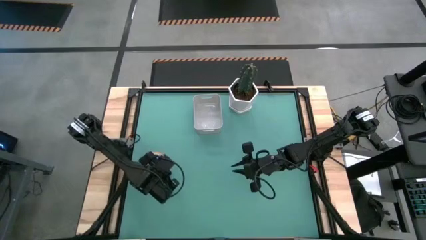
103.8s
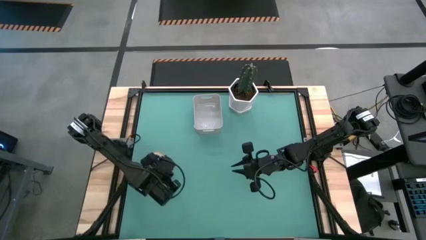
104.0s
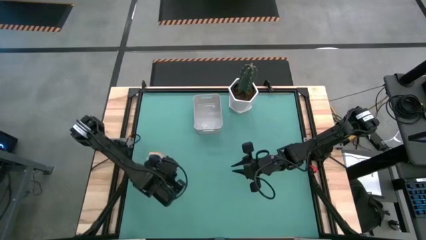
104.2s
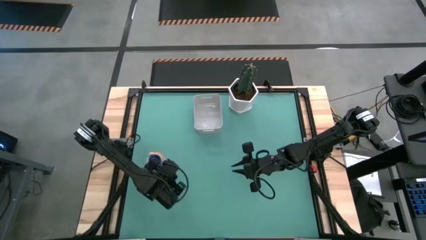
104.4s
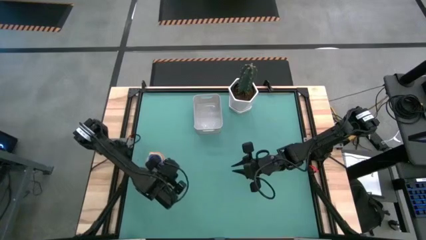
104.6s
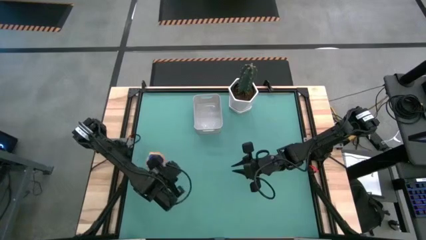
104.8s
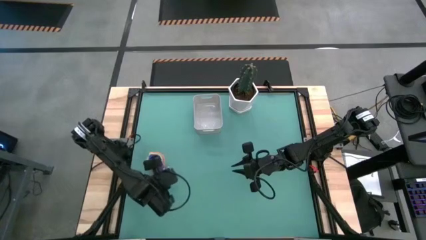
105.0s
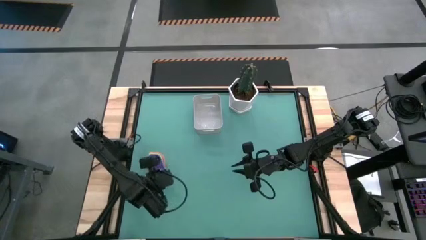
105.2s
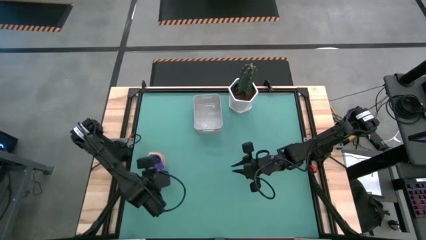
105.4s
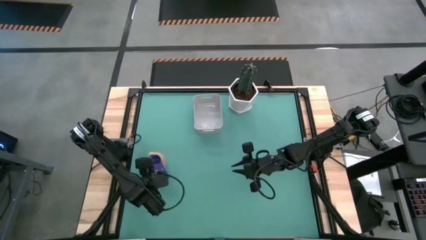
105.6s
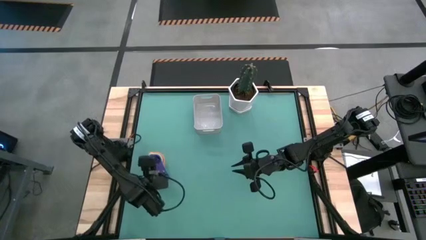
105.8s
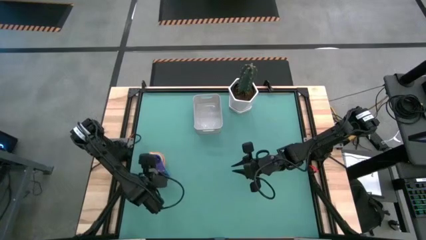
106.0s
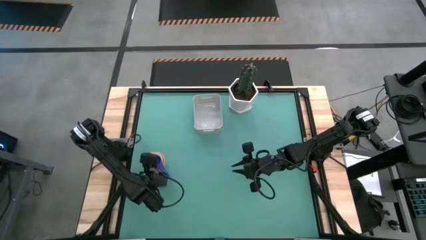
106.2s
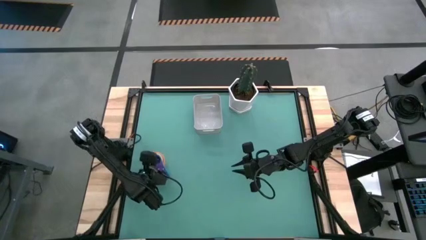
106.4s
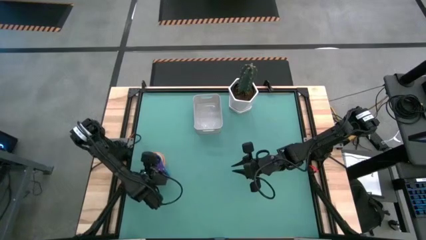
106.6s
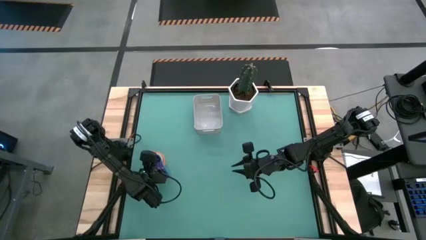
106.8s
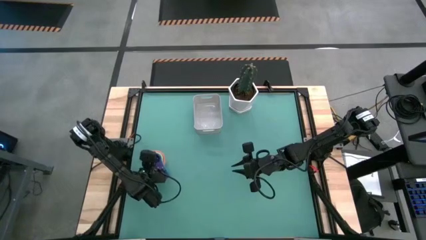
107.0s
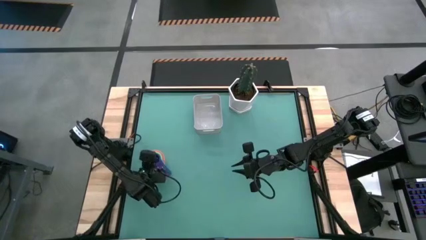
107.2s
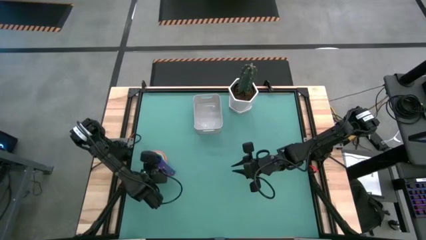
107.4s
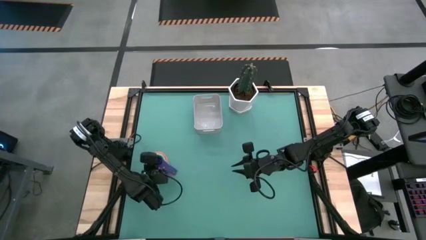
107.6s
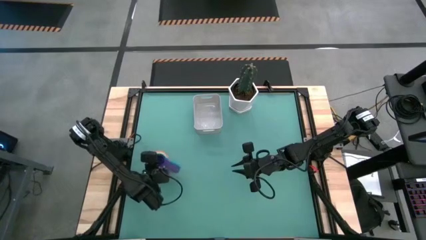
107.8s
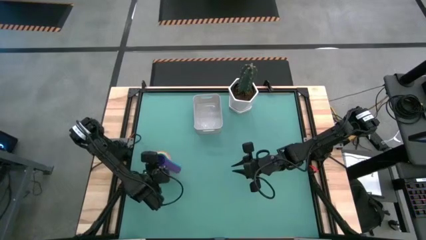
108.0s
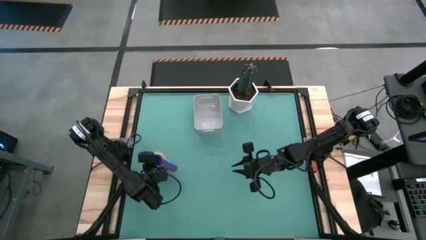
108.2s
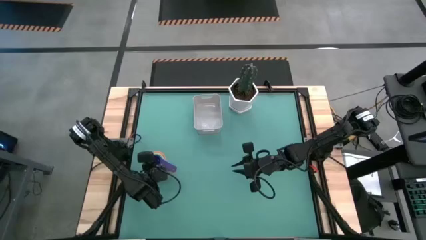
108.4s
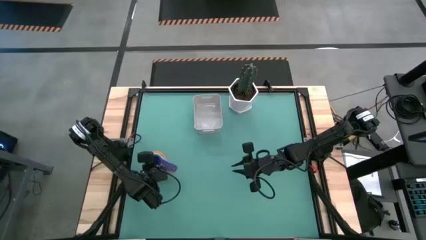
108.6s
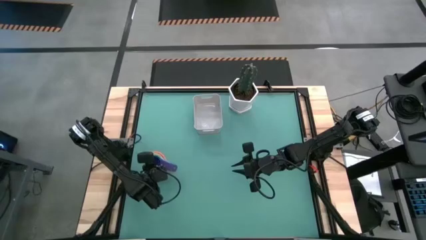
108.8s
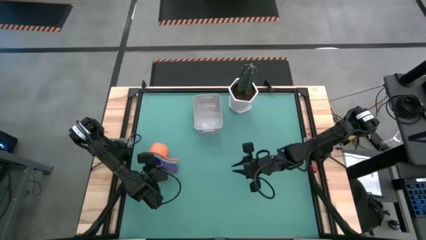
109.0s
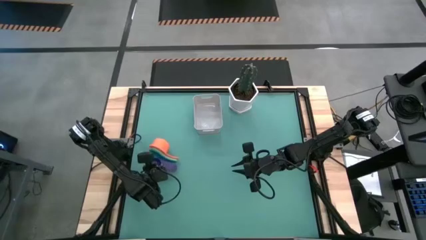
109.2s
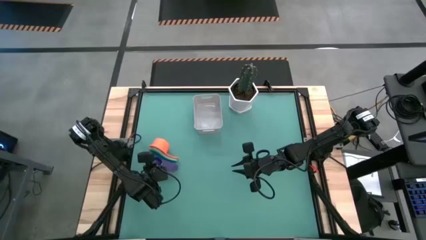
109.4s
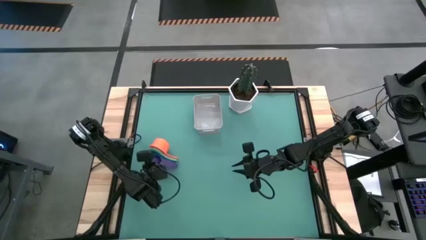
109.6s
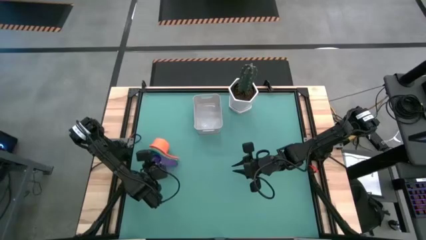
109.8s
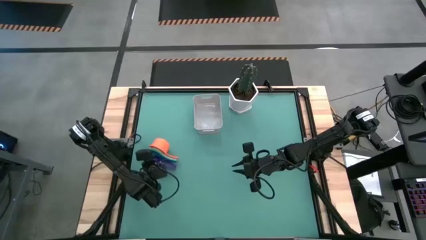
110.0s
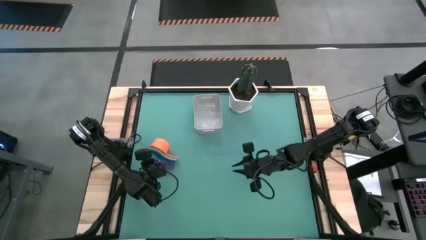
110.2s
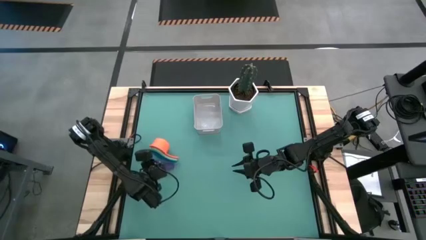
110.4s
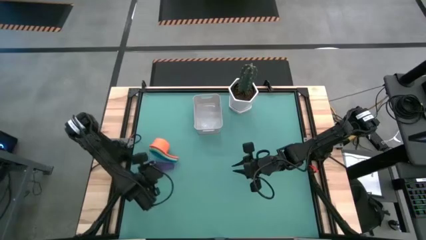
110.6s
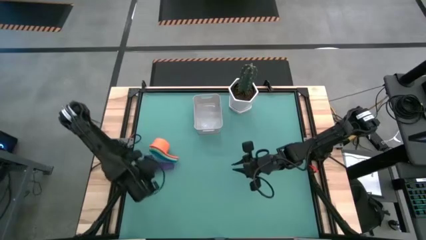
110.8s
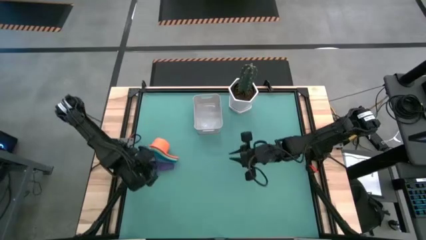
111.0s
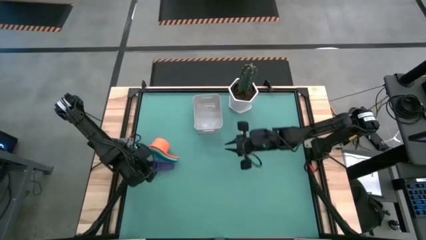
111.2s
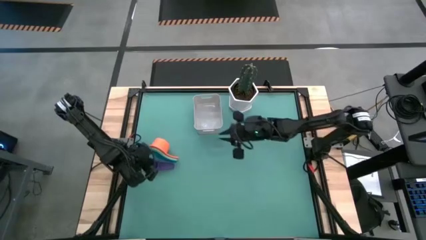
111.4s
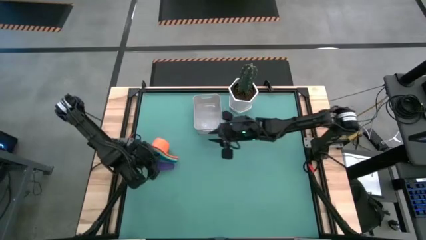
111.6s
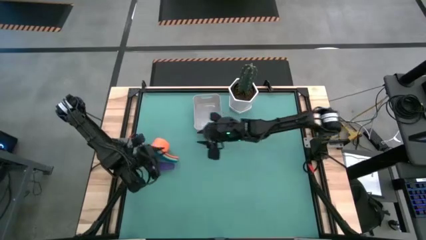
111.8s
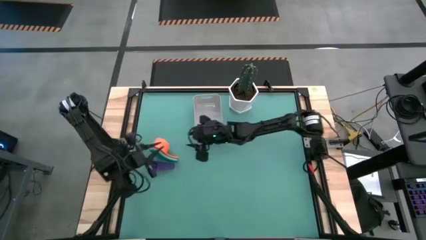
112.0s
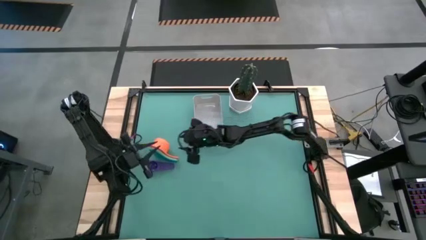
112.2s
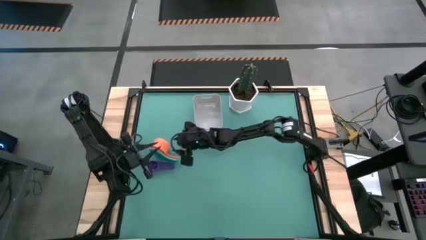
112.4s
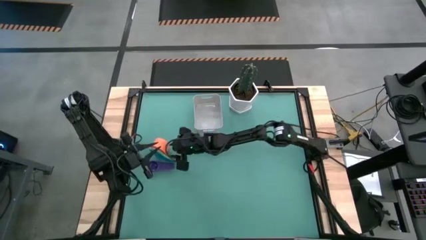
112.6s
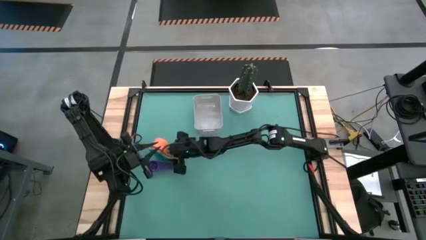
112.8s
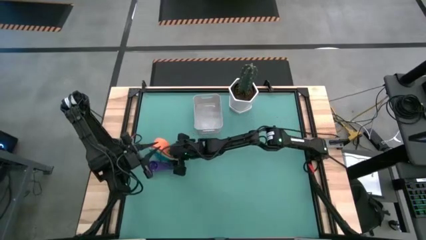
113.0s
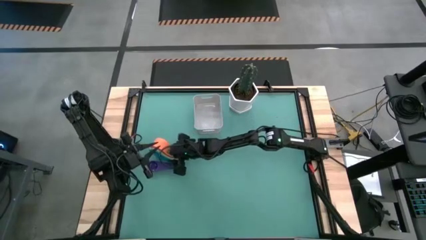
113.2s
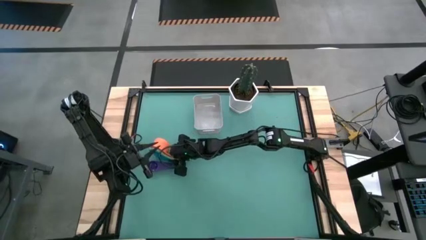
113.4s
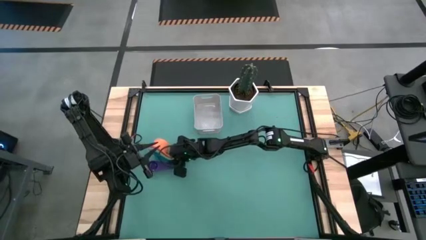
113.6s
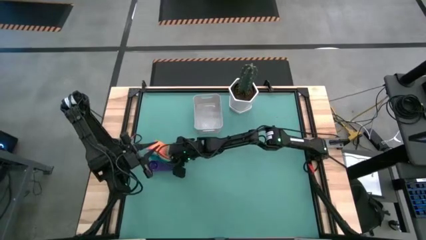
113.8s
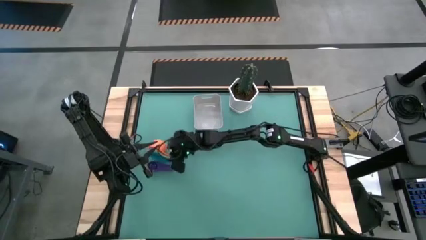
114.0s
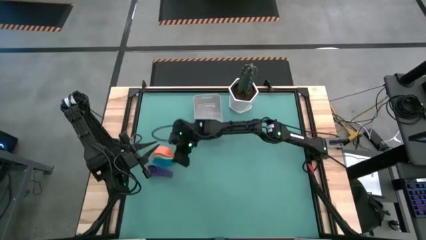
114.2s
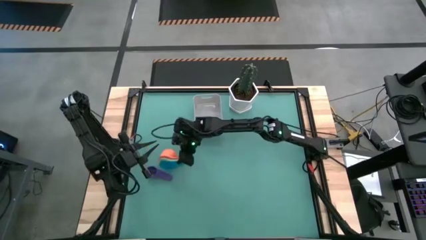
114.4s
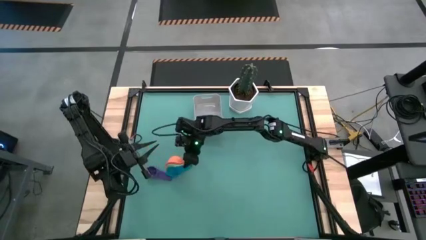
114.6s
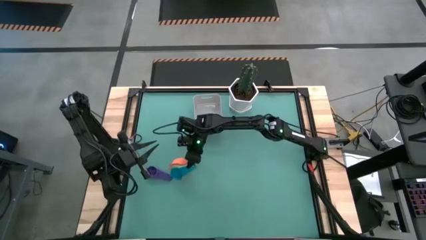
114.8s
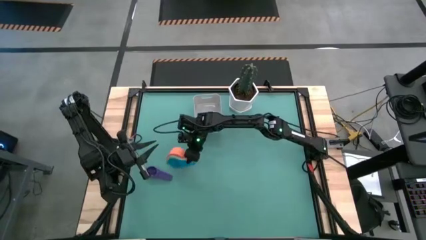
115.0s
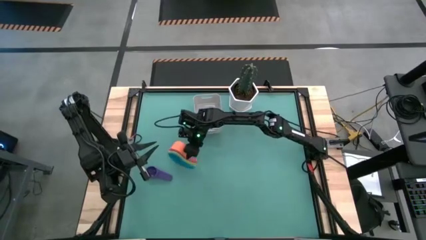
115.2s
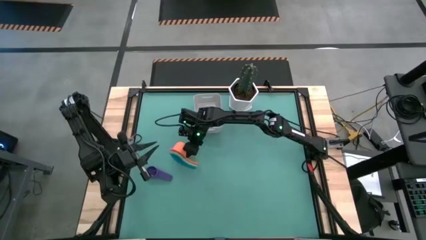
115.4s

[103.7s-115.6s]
Task: Nest measuring cups in basket
Put the nested measuring cups into the gray bin

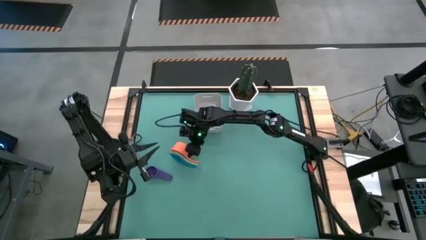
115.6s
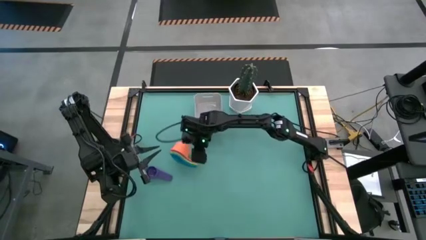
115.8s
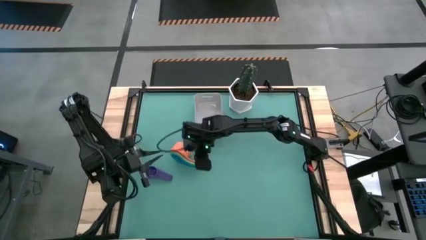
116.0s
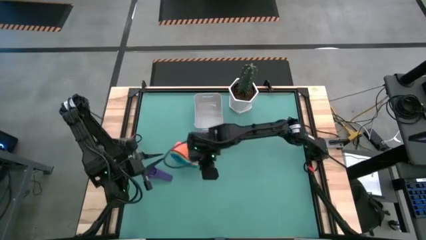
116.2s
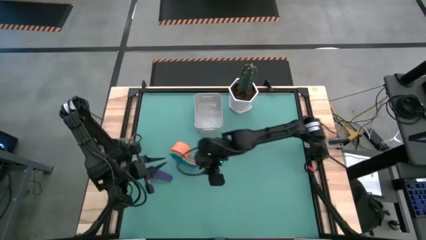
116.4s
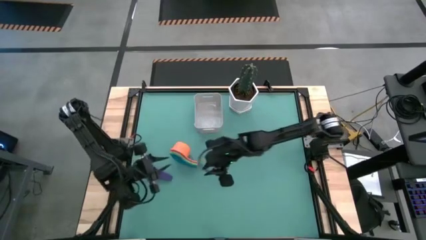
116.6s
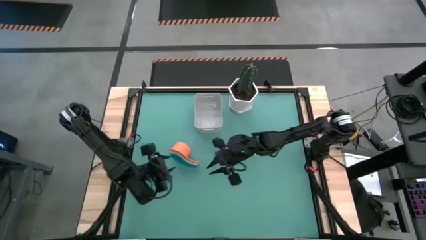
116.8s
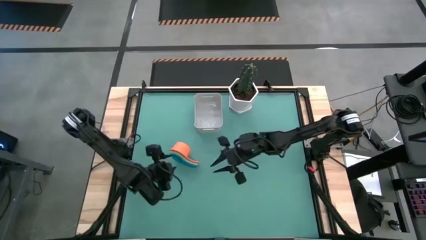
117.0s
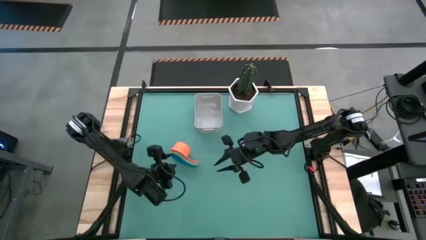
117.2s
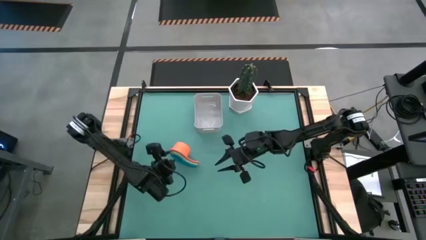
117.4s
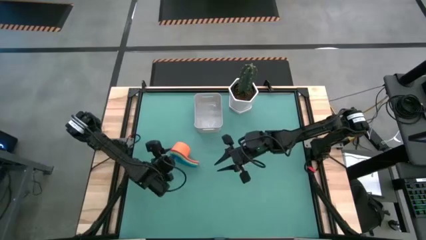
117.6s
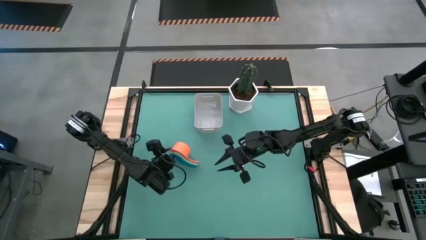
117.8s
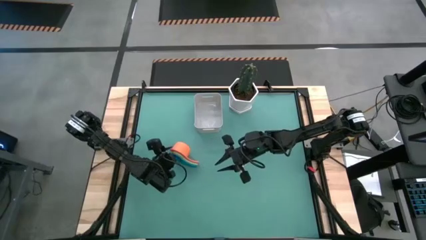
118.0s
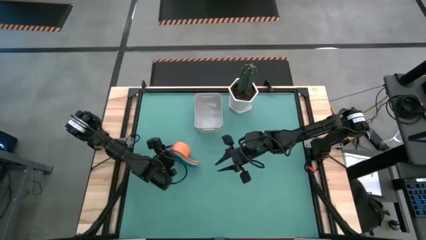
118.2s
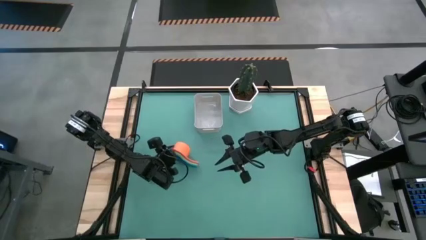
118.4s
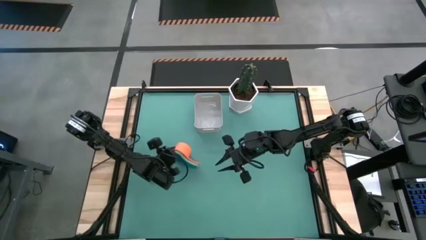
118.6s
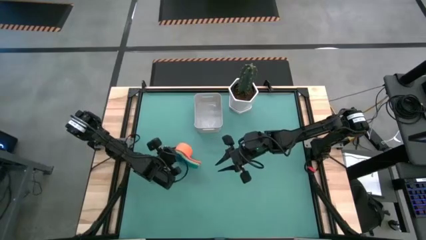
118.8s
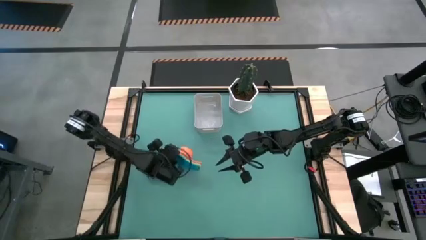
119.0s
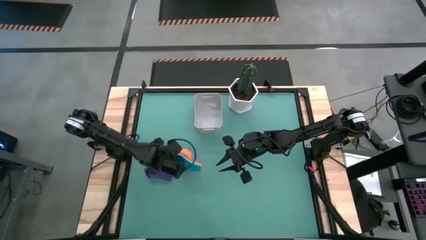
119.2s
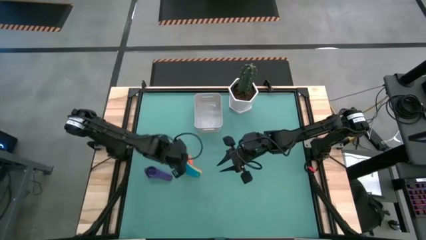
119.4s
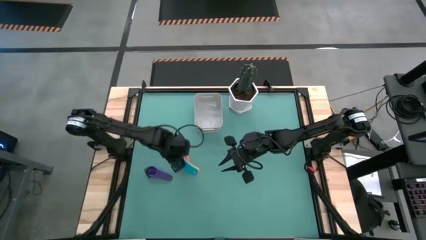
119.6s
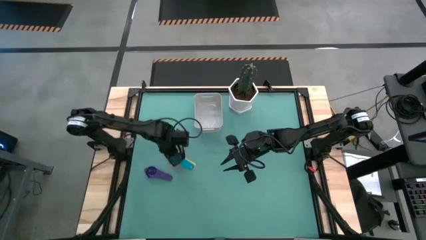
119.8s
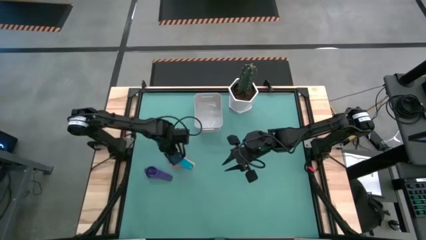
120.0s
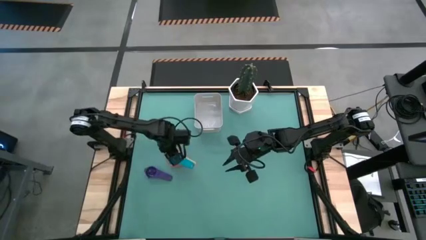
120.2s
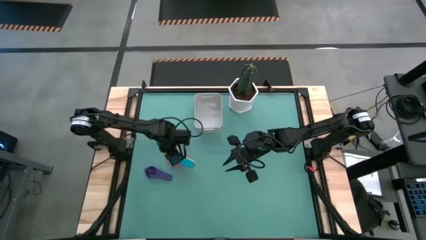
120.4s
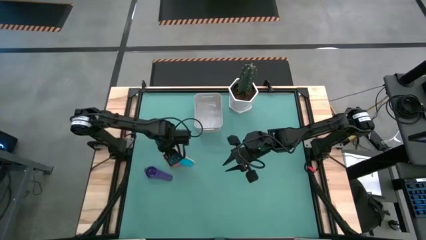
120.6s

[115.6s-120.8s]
Adjust the nested measuring cups
